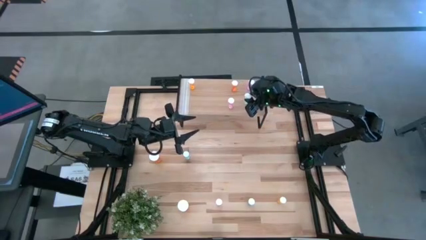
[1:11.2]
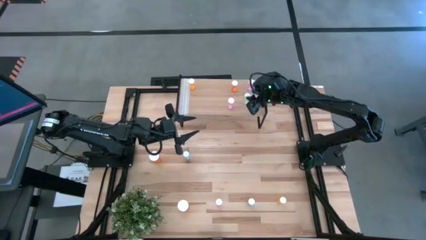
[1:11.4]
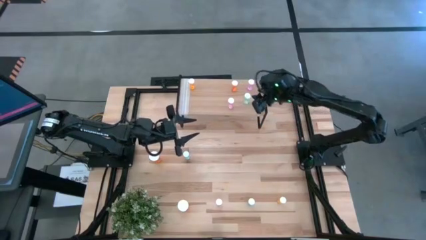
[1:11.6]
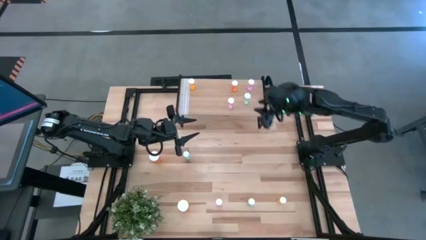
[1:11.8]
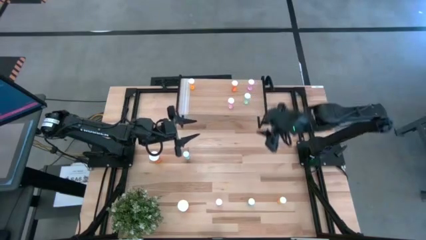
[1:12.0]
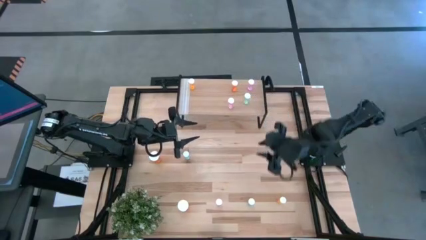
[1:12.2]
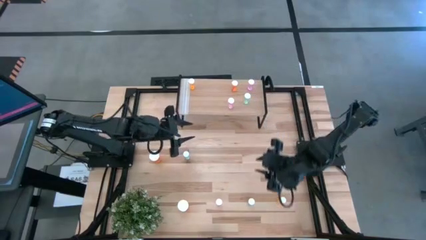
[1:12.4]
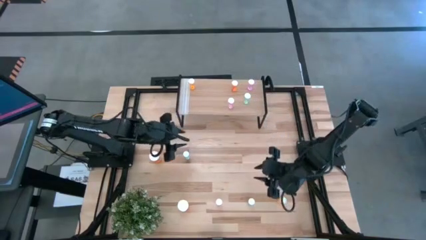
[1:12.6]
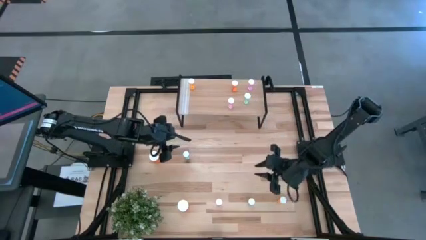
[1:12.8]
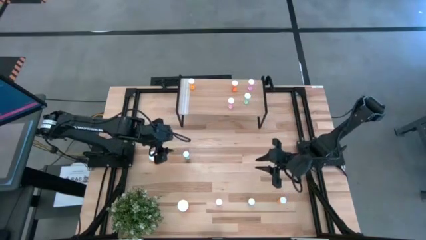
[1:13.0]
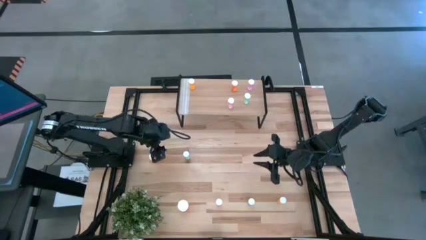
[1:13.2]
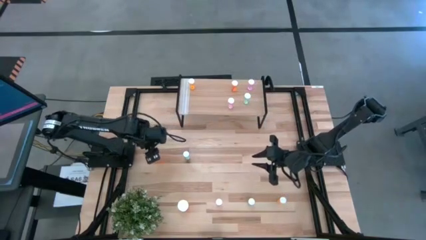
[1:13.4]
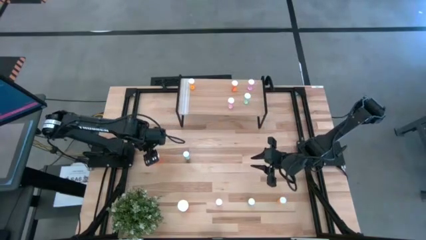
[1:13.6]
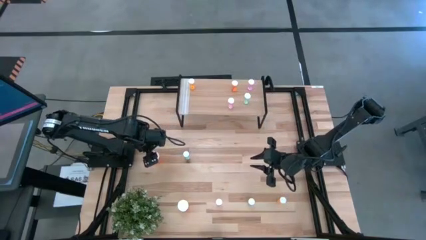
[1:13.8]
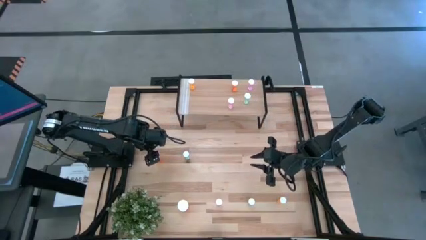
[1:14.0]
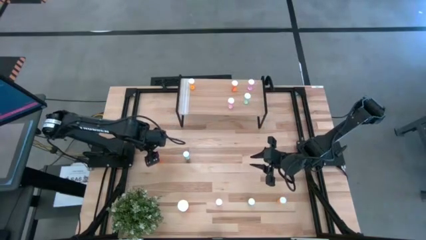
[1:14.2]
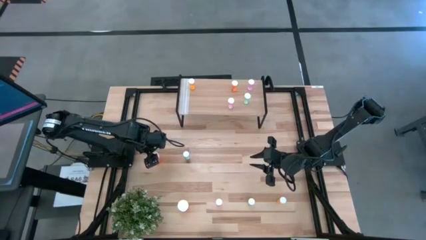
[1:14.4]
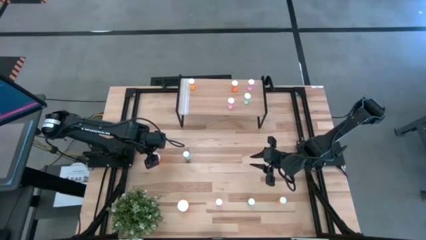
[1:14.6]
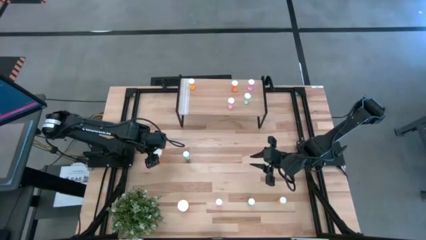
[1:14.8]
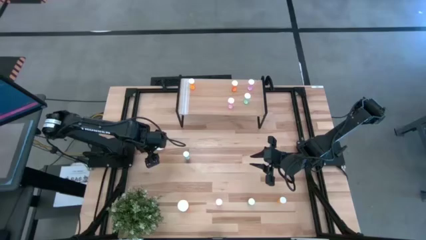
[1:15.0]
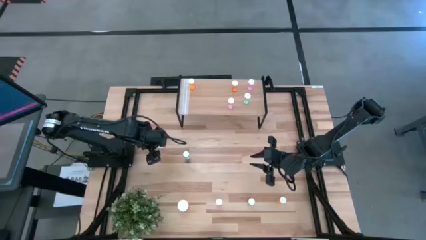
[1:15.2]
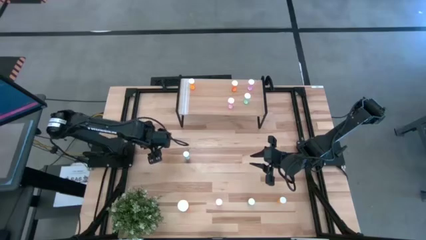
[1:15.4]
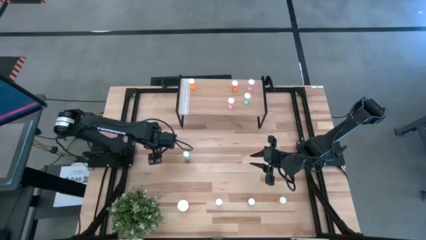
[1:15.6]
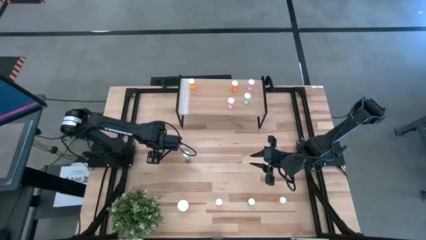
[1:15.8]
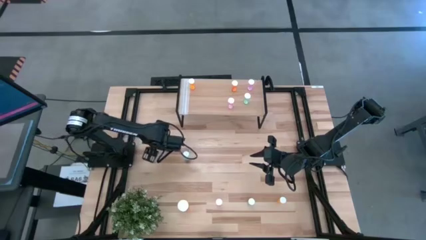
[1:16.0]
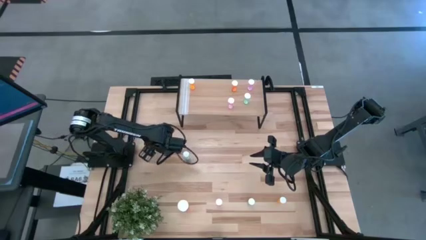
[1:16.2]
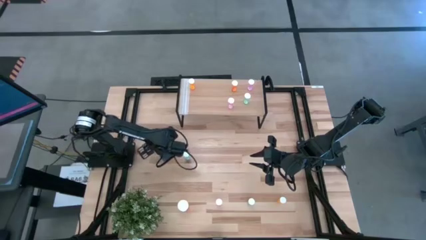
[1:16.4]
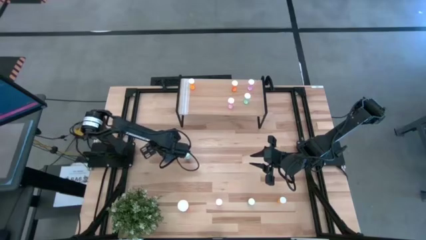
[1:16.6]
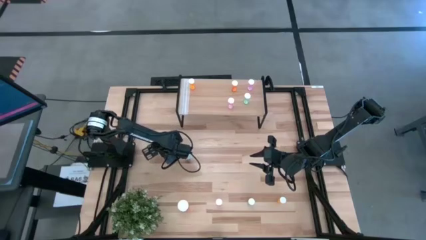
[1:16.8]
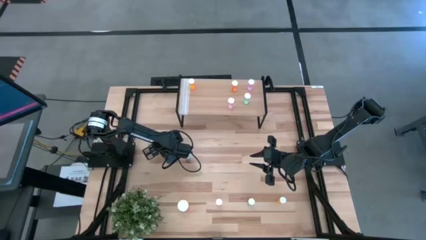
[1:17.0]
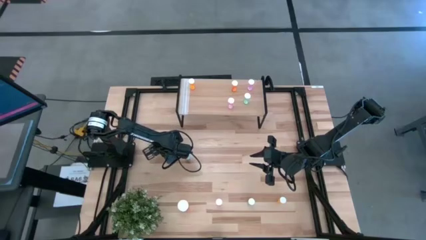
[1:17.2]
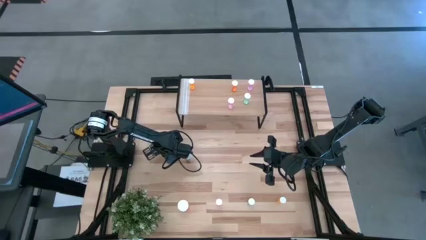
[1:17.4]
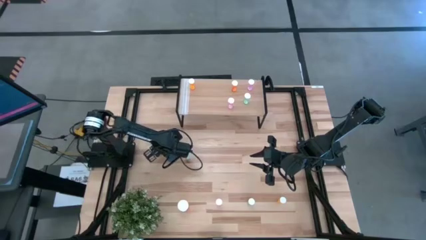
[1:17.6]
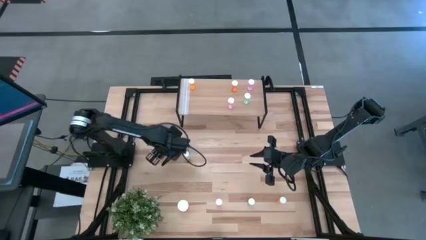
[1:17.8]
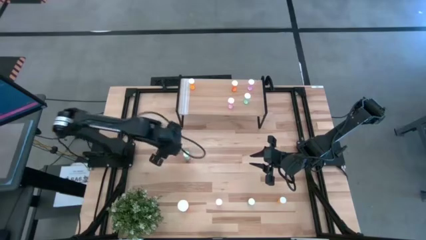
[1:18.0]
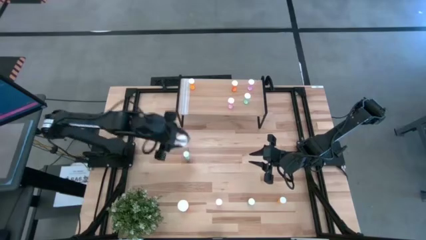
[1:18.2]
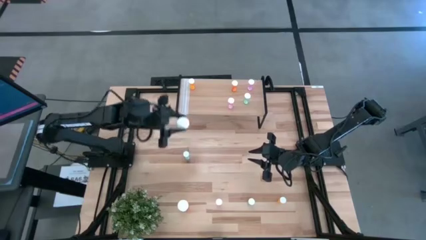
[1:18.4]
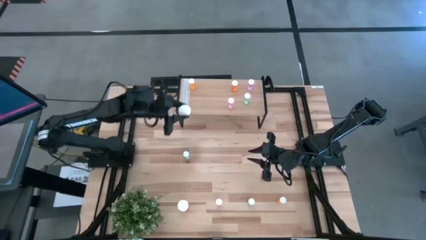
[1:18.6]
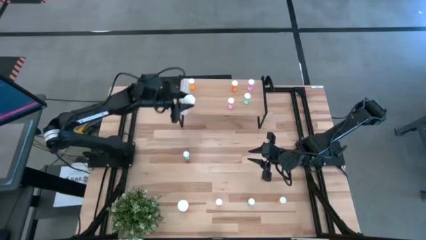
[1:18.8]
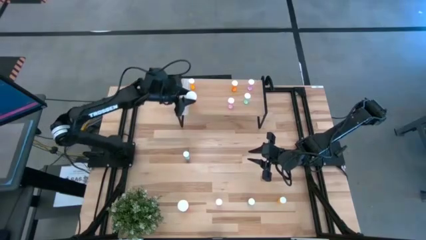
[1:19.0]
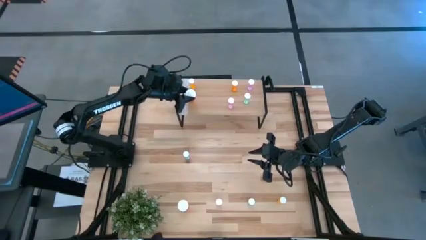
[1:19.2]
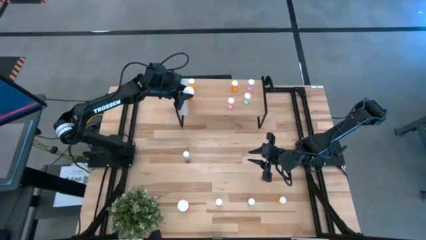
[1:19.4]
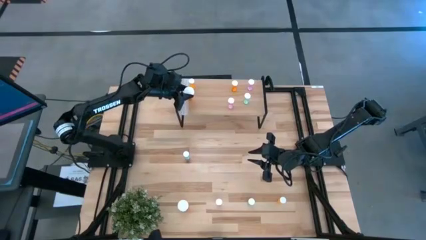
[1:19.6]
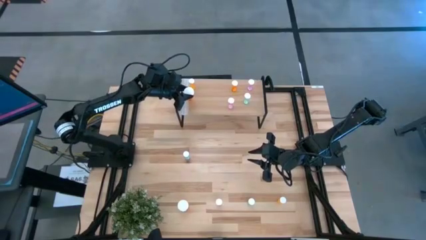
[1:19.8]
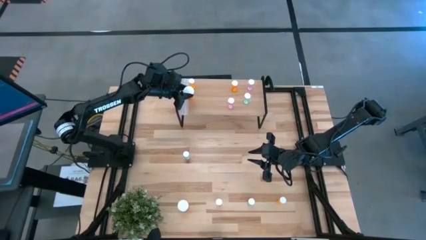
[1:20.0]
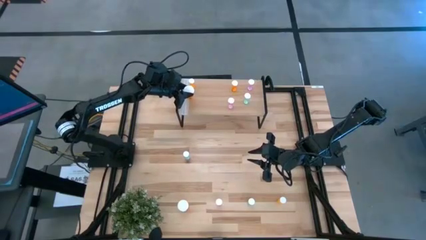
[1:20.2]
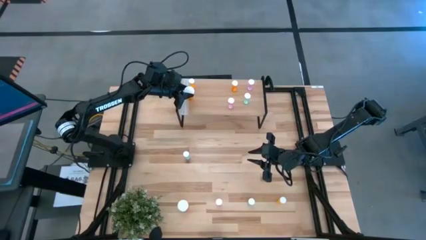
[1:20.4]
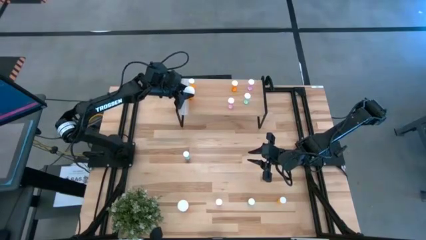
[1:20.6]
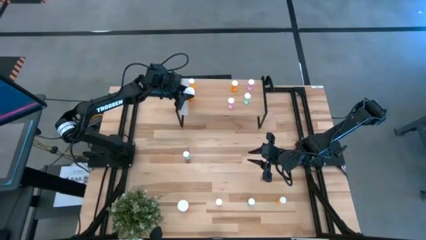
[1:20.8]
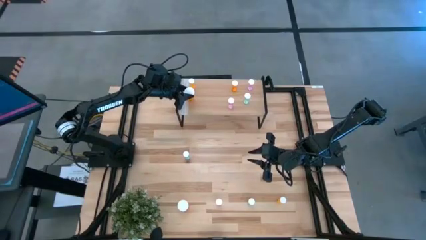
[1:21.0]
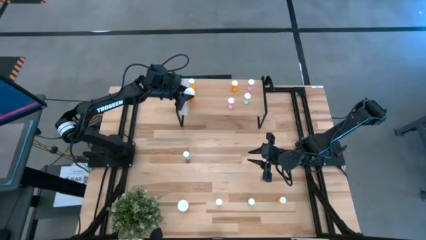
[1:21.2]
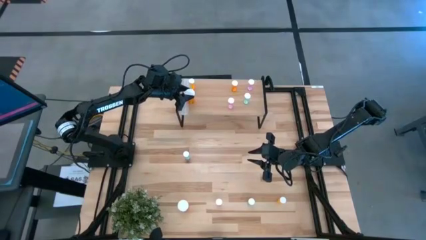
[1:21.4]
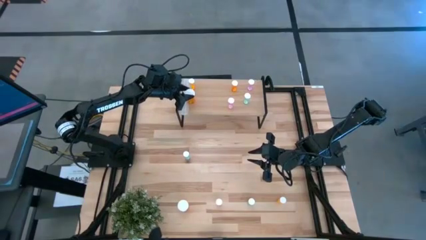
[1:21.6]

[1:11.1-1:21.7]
Task: Pick and place medicine bottles onto shelf by color
Put the top big orange pill bottle on the shelf

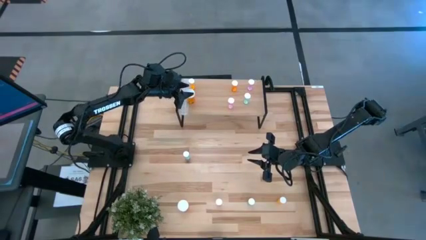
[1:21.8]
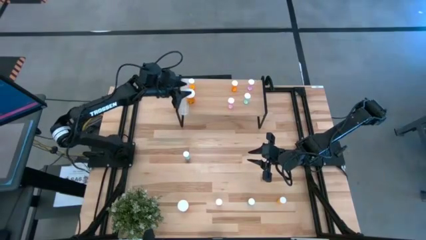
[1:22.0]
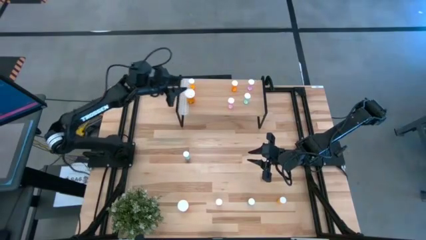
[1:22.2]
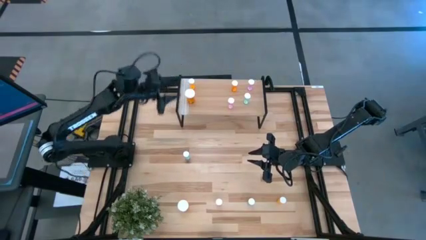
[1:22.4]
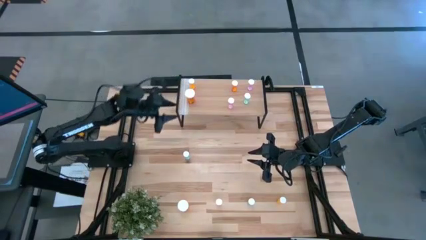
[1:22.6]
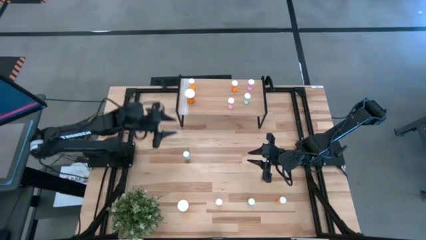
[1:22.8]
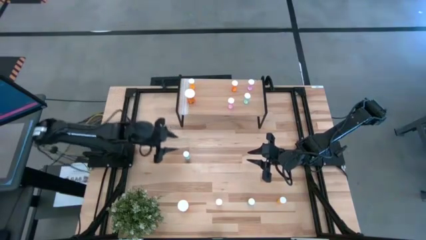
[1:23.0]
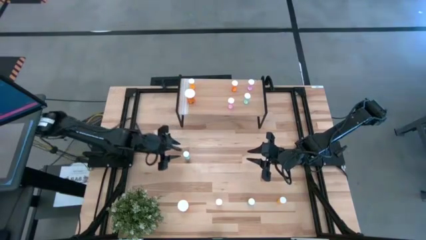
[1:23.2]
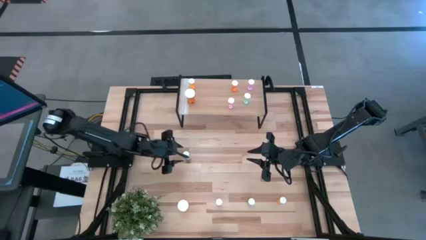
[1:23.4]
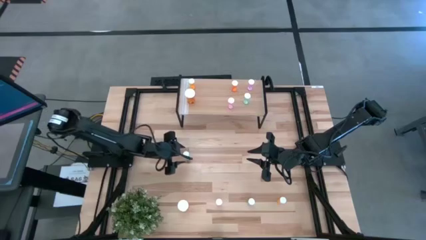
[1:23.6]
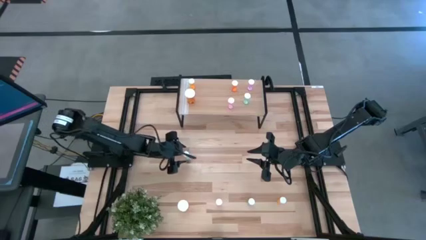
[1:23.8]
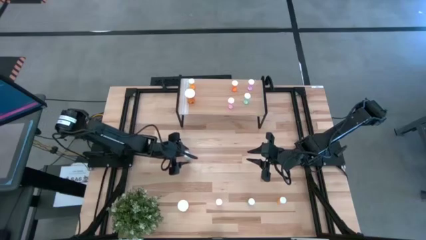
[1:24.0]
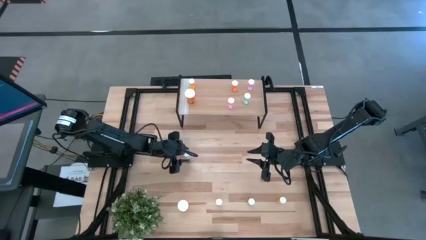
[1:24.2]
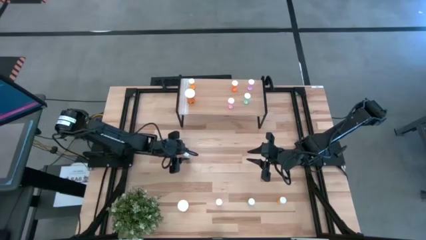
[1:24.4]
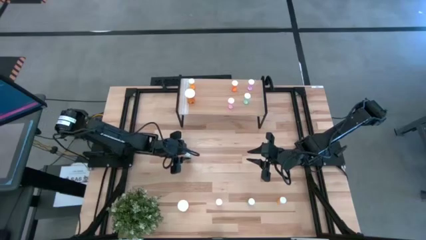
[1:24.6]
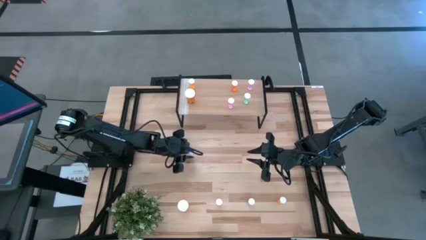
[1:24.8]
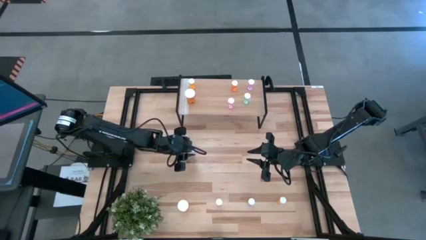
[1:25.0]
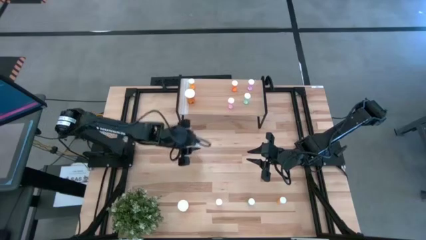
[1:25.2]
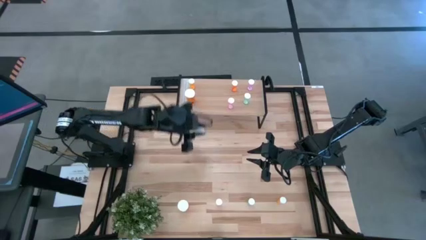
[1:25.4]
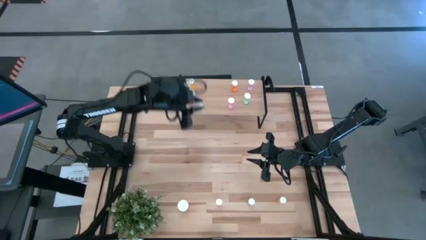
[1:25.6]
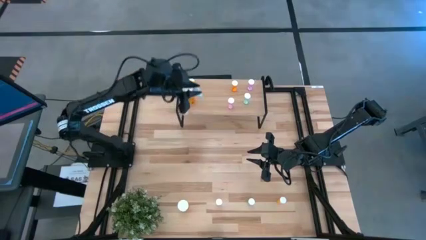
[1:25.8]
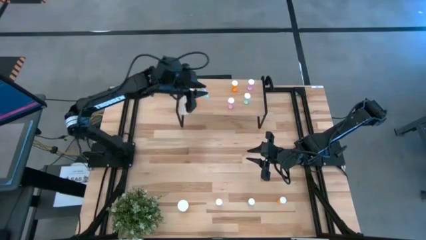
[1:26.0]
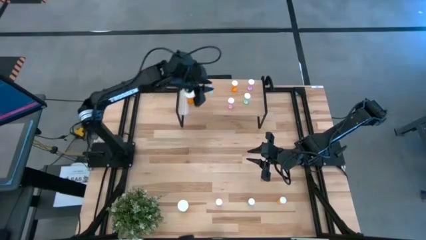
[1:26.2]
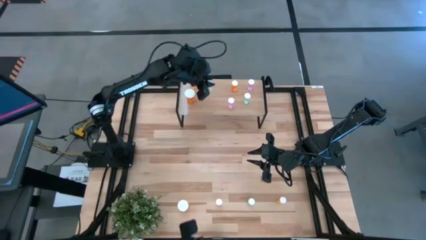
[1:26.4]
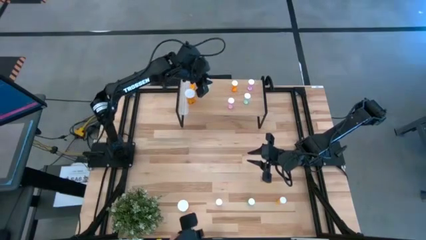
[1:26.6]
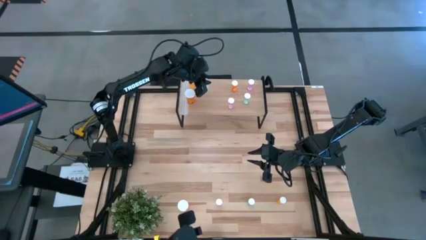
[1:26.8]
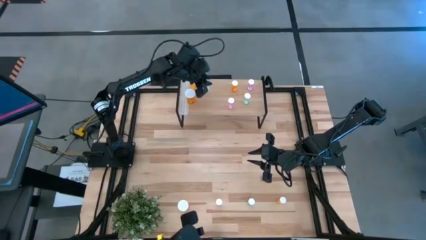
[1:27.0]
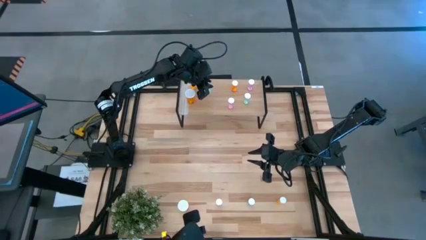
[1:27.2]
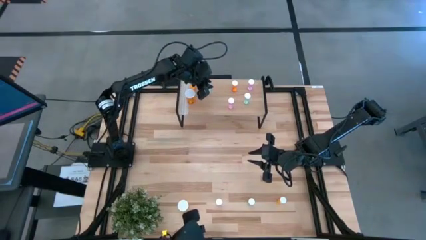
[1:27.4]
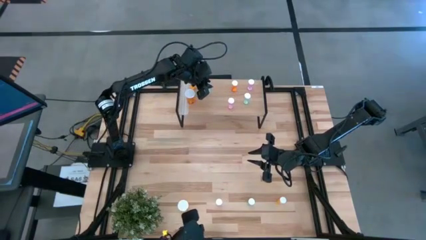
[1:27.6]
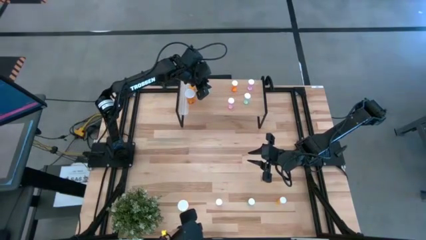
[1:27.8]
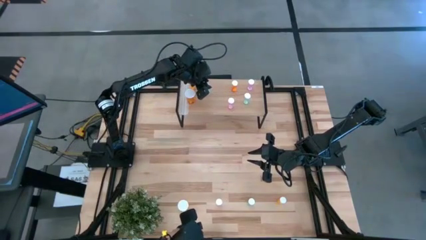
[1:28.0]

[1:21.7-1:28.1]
Put the top blue small pill bottle on the shelf
